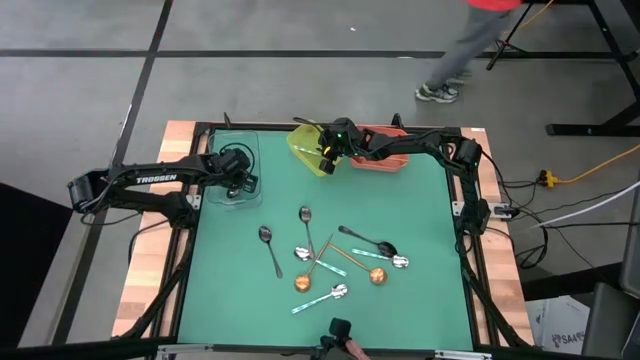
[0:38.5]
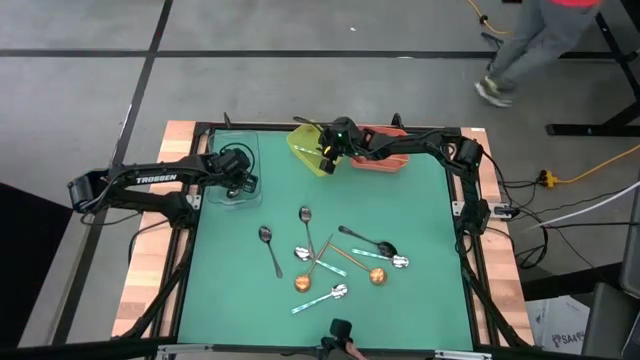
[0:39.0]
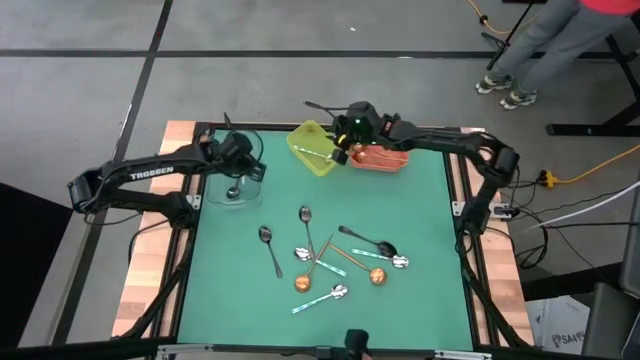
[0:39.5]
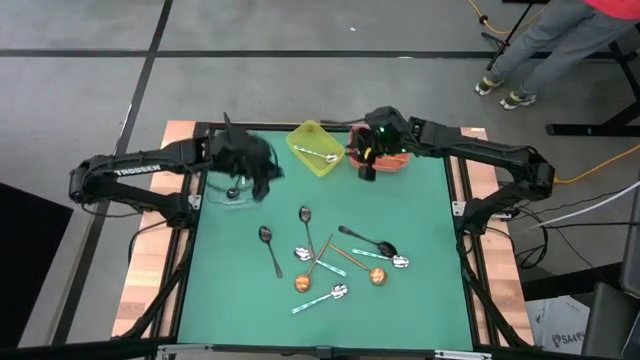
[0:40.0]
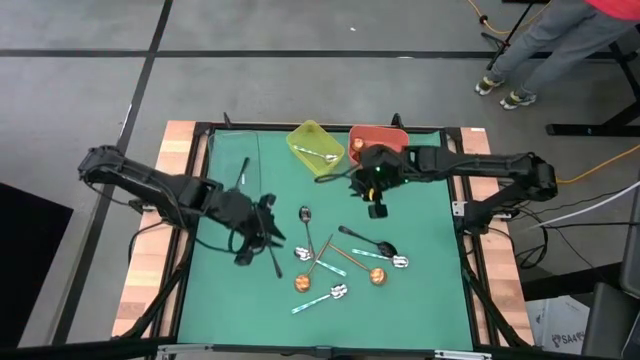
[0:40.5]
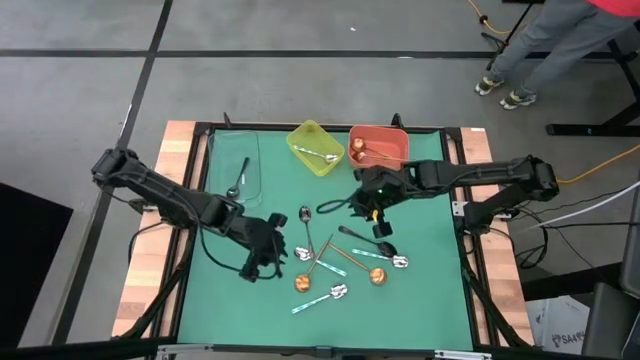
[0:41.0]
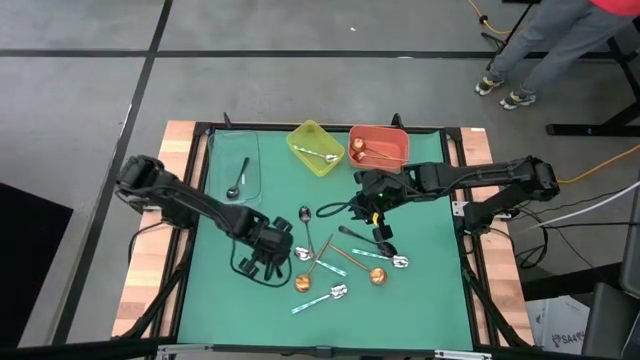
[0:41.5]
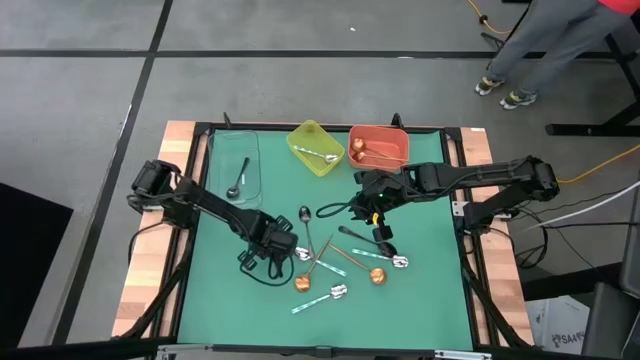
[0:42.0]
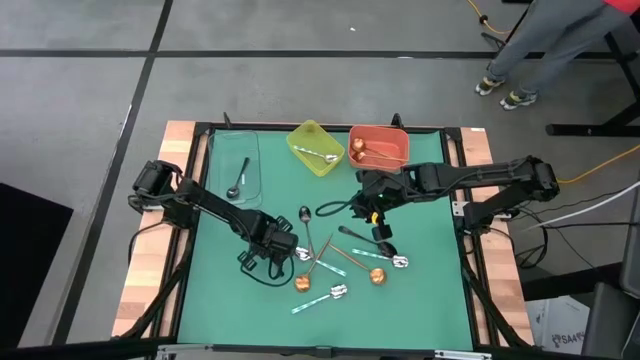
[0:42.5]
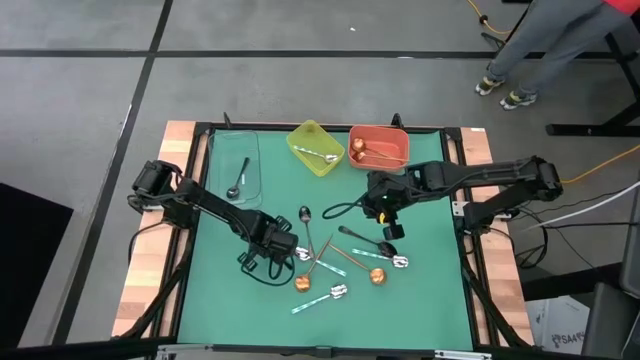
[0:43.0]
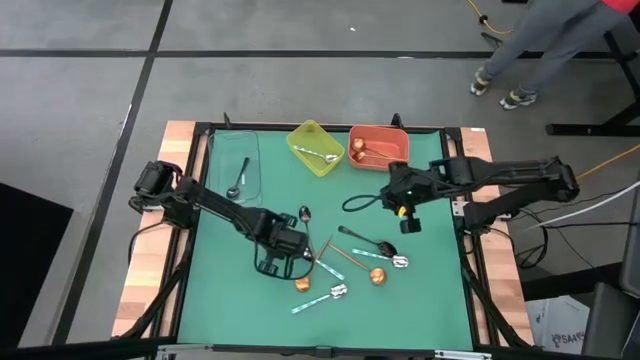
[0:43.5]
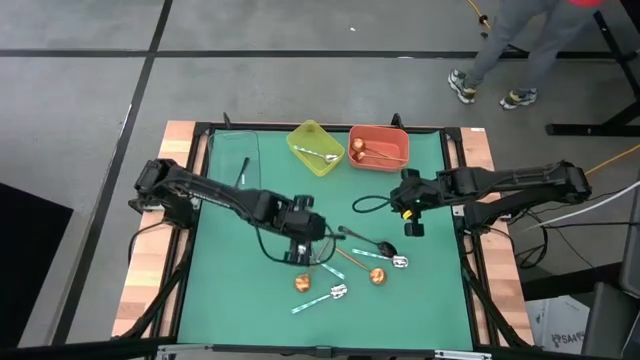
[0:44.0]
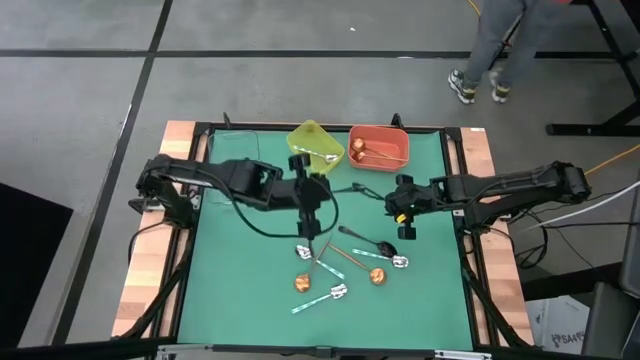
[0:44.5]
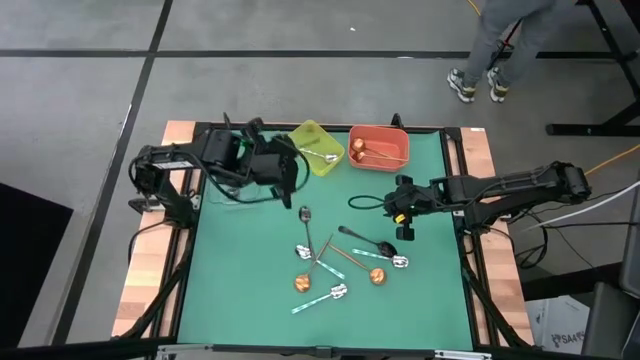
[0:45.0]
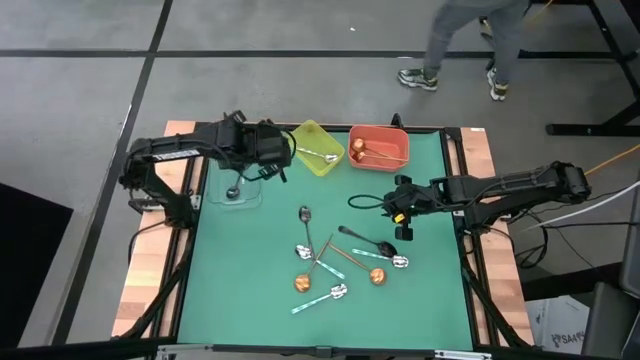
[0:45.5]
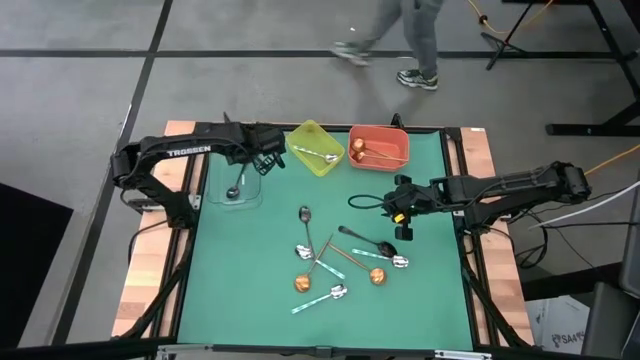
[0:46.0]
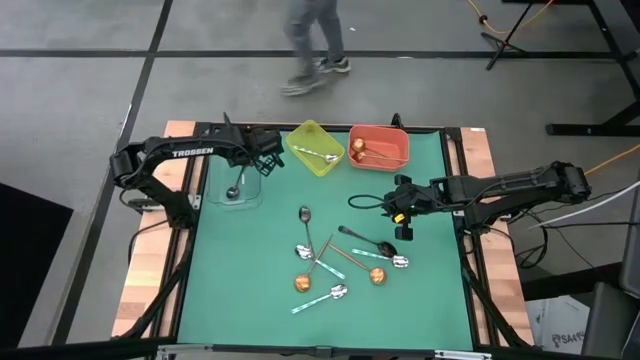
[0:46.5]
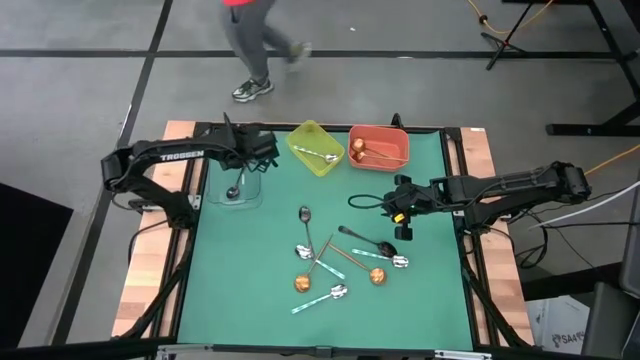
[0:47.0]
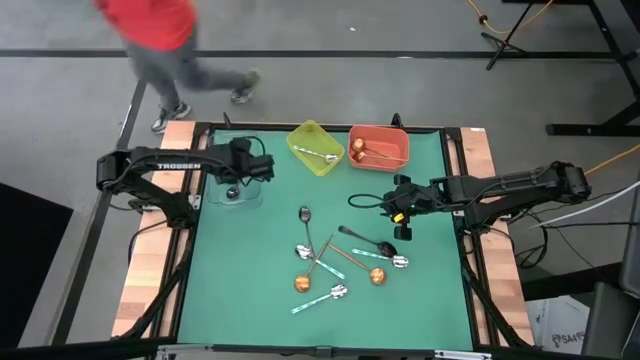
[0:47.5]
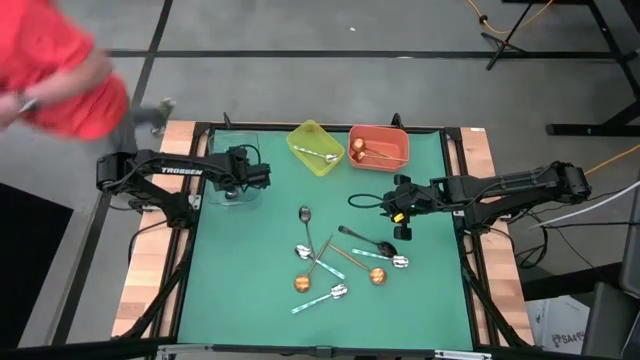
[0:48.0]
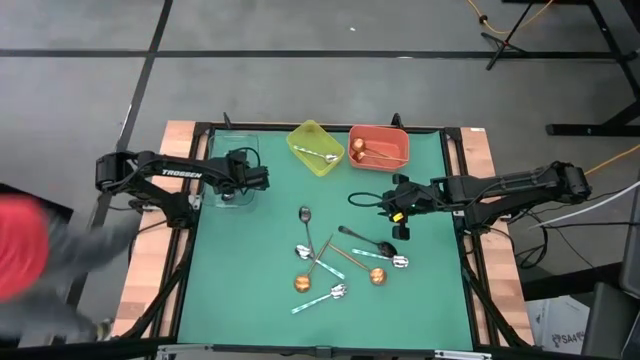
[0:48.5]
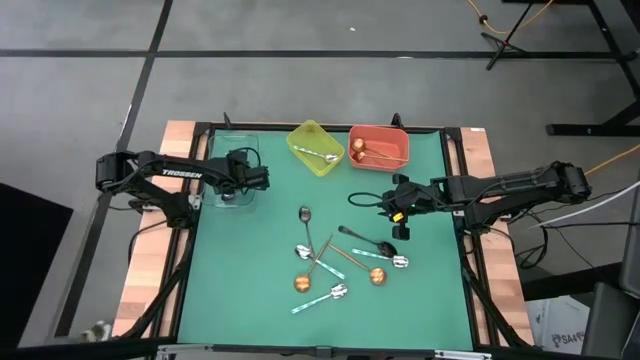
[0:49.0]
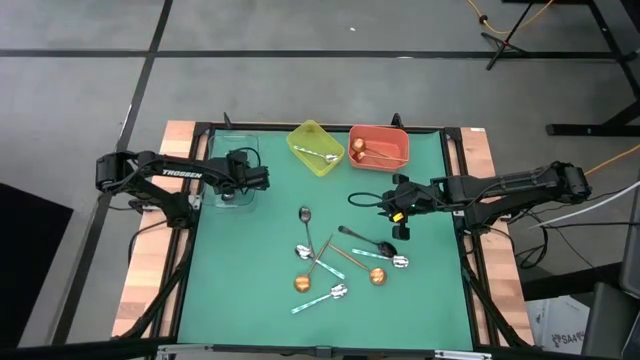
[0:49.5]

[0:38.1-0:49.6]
Task: Sort silverware by color (type)
Put the black spoon into the transparent bin

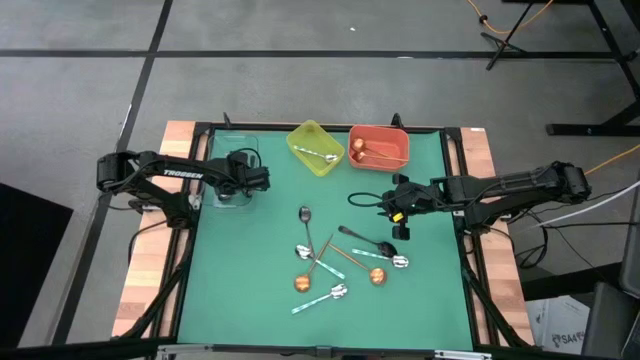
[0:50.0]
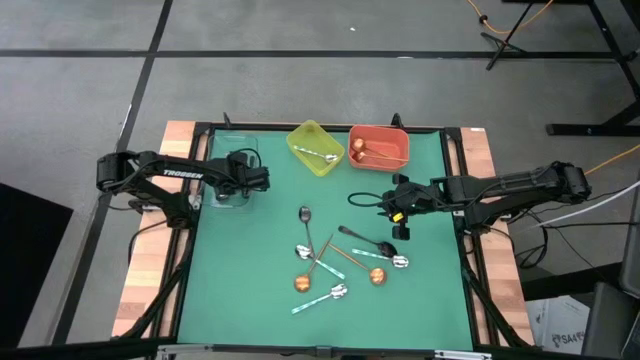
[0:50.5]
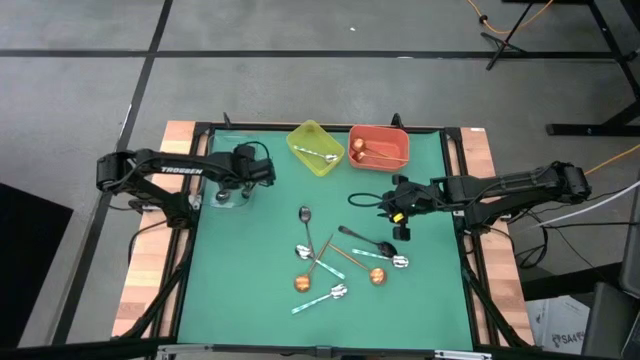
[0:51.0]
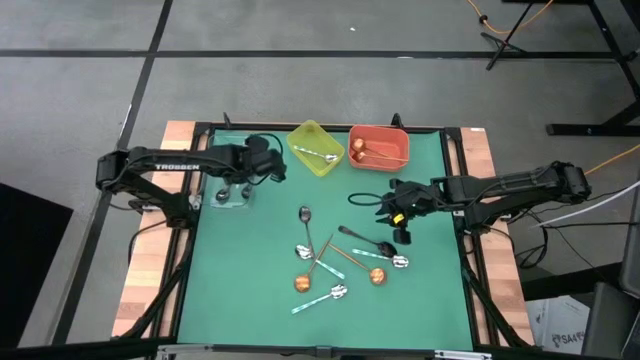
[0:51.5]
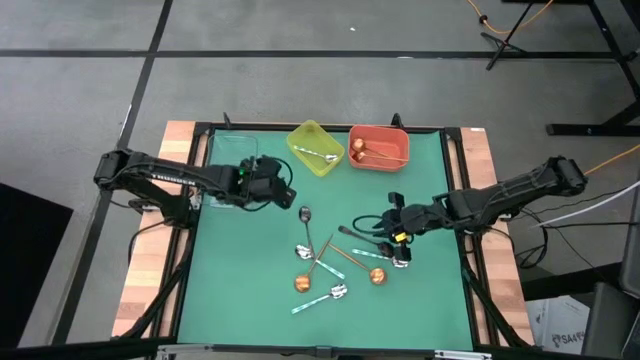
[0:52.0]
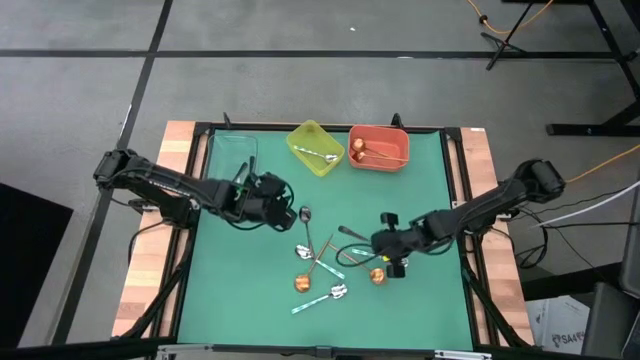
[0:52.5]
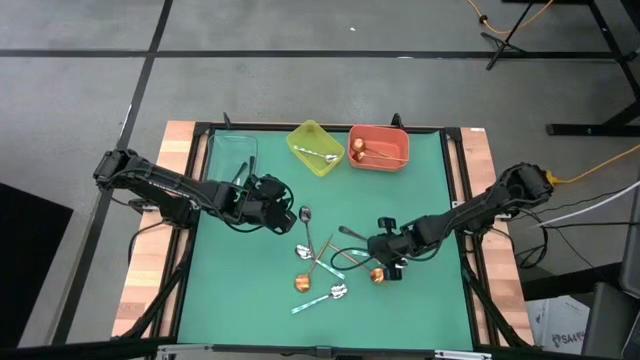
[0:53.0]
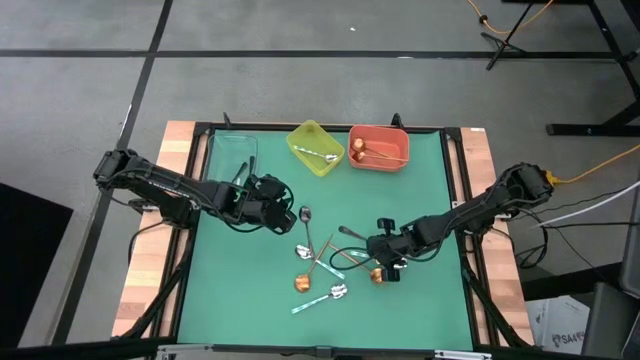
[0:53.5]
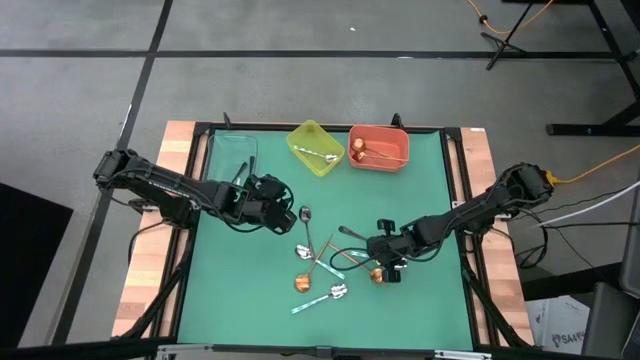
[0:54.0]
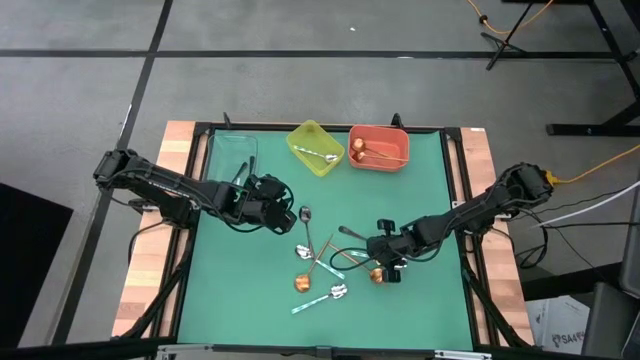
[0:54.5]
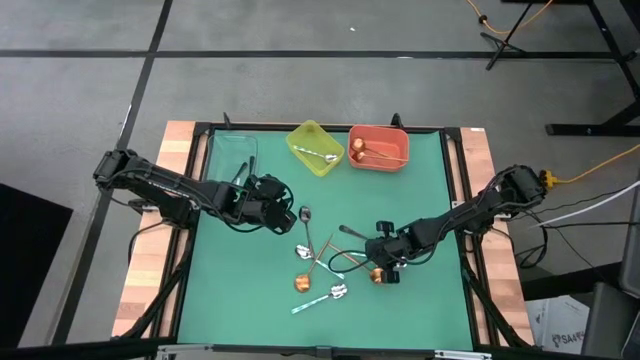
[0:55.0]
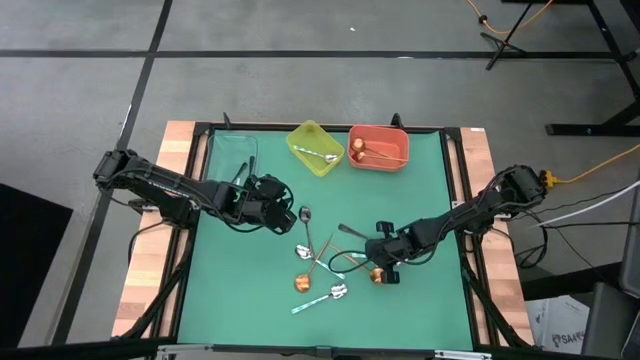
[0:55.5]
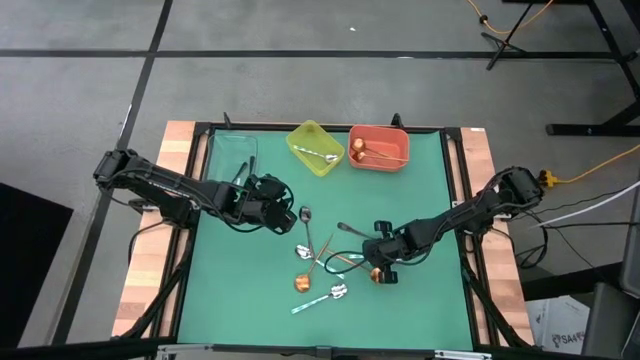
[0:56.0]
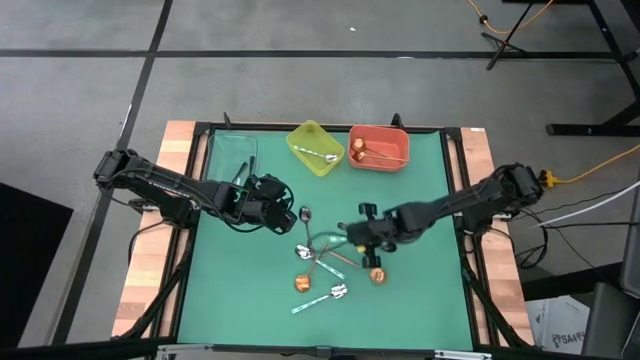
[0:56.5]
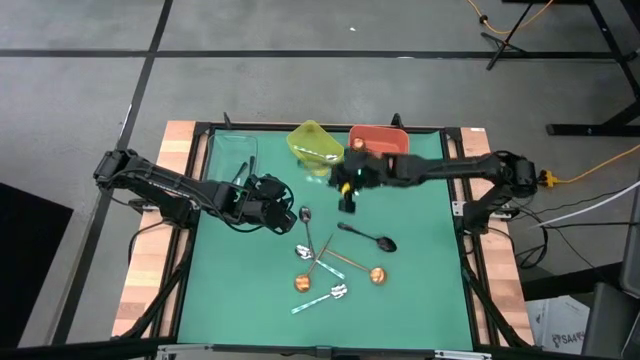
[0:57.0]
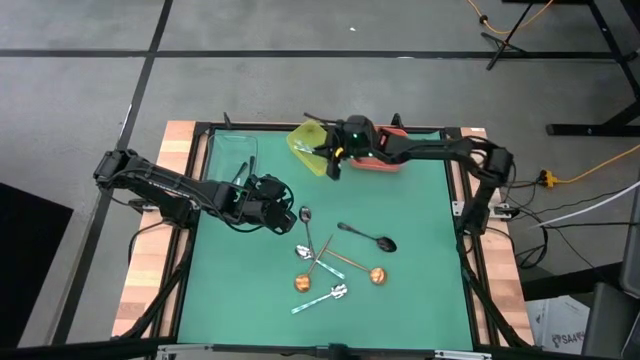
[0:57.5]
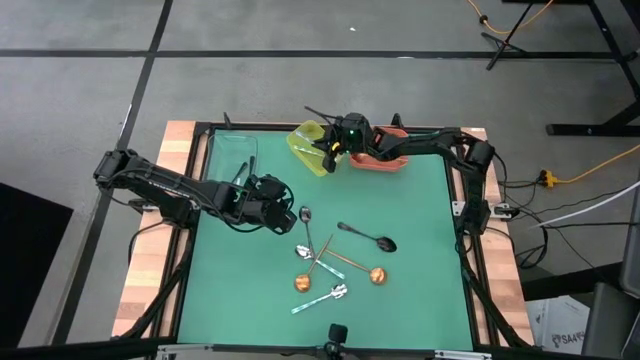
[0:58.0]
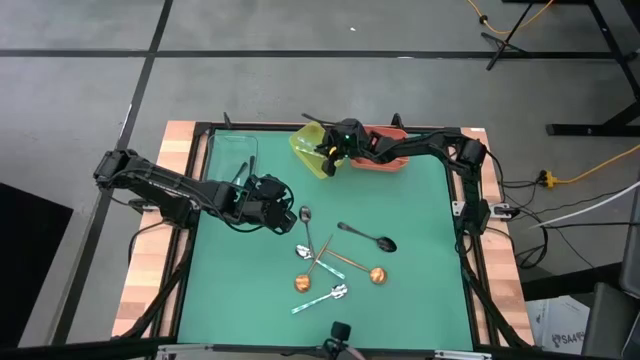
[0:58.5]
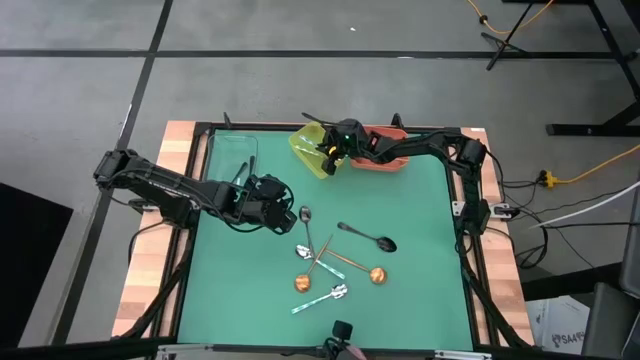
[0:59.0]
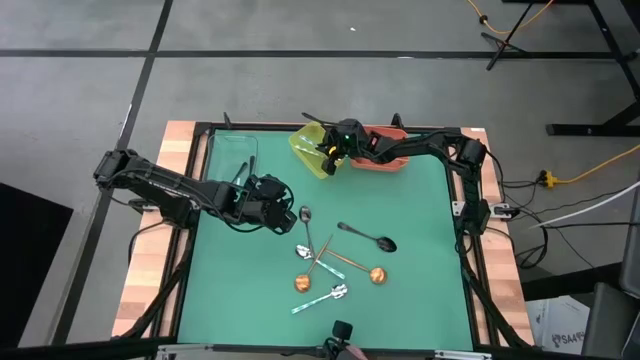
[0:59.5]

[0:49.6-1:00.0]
Put the blue spoon into the green bin
